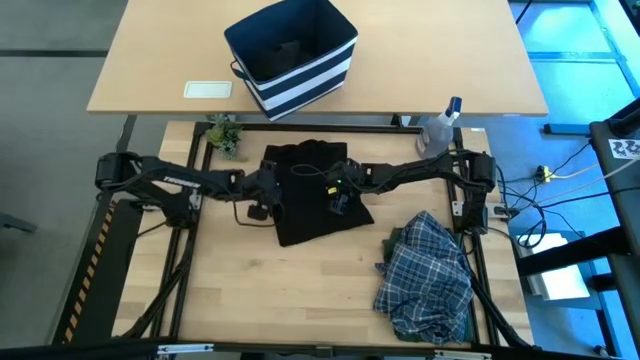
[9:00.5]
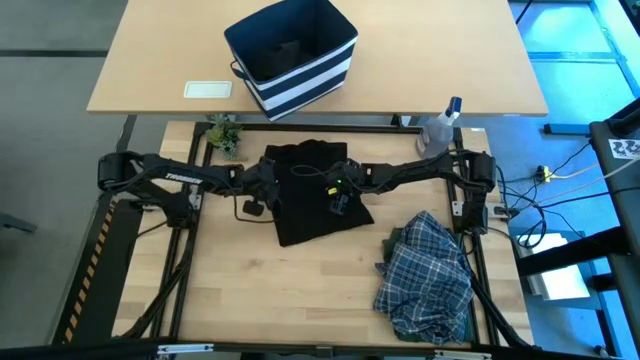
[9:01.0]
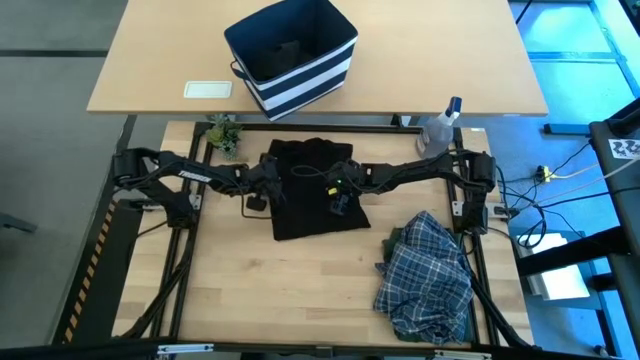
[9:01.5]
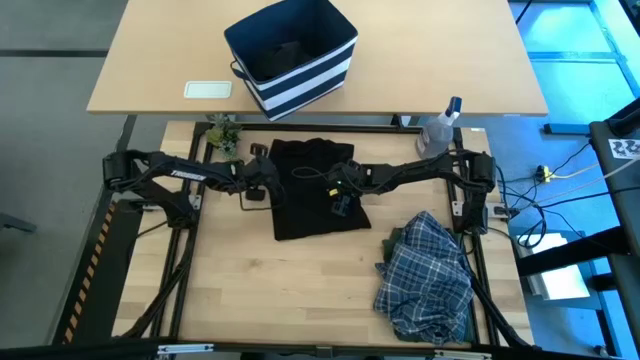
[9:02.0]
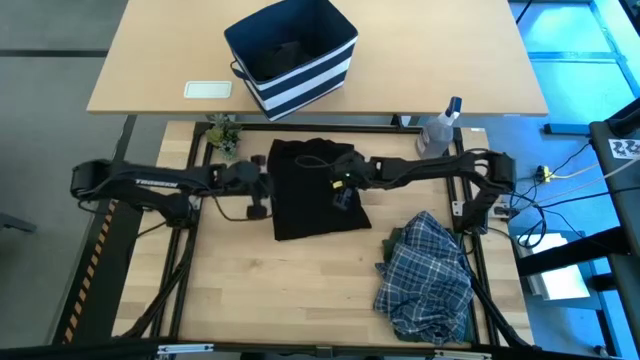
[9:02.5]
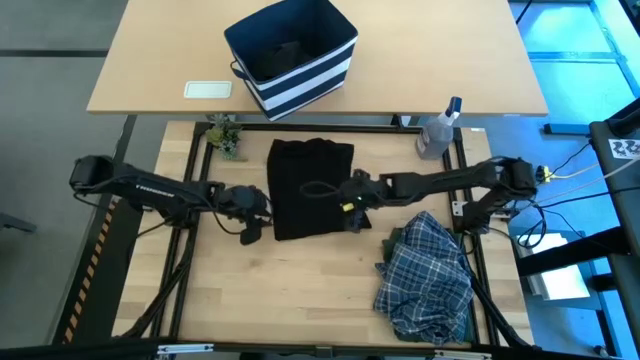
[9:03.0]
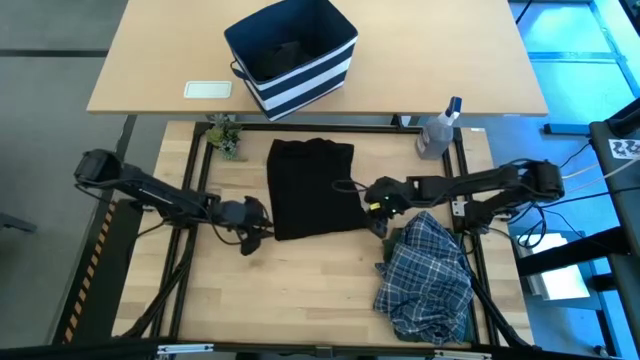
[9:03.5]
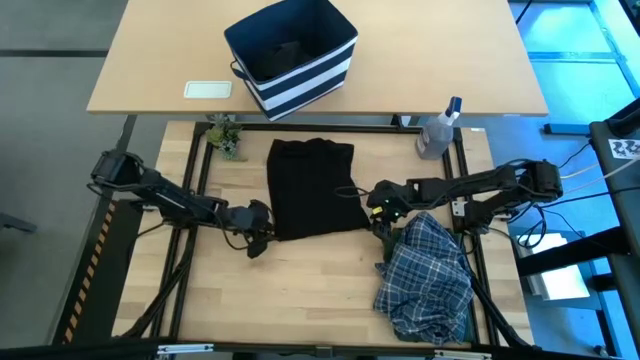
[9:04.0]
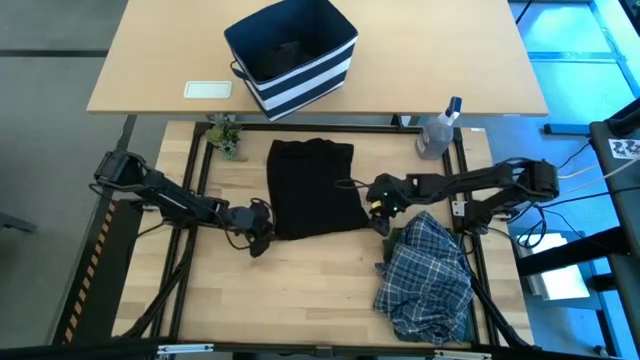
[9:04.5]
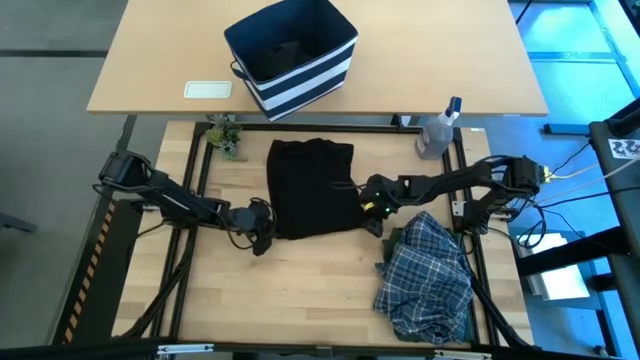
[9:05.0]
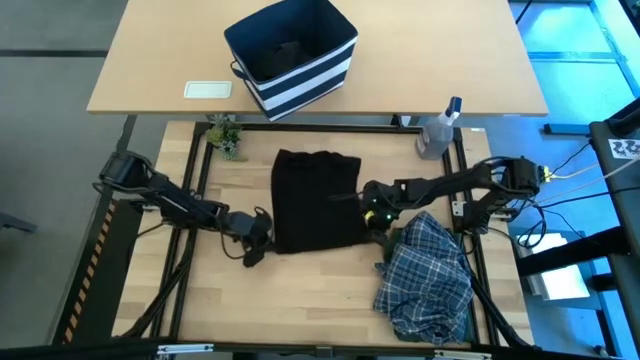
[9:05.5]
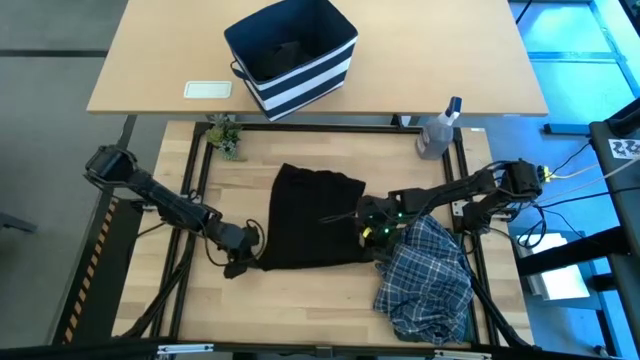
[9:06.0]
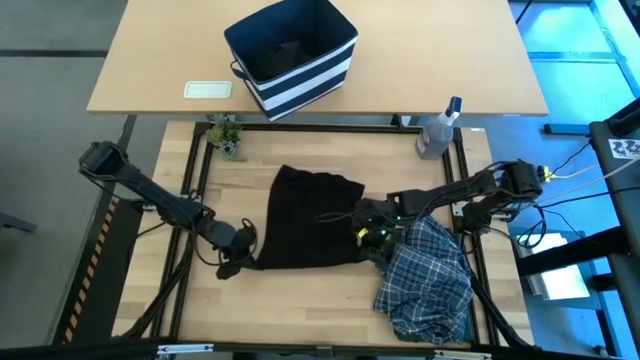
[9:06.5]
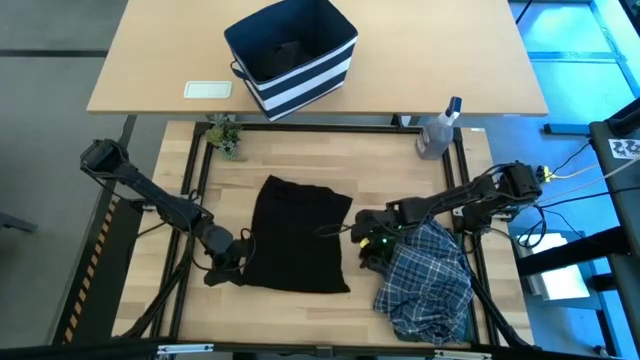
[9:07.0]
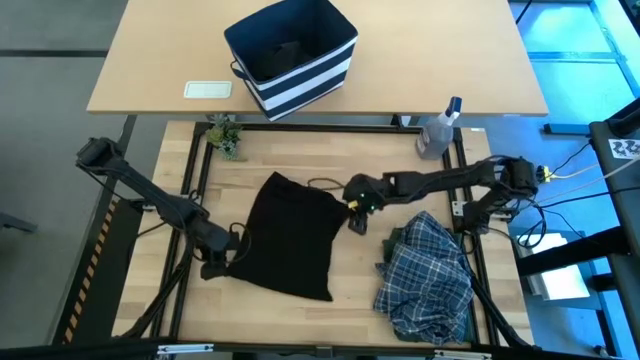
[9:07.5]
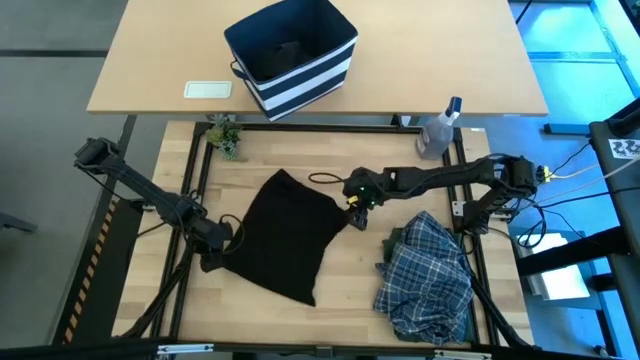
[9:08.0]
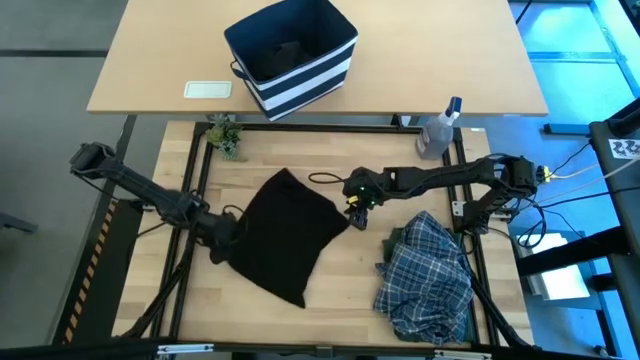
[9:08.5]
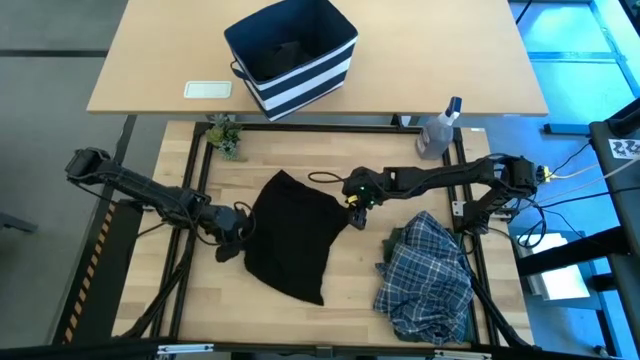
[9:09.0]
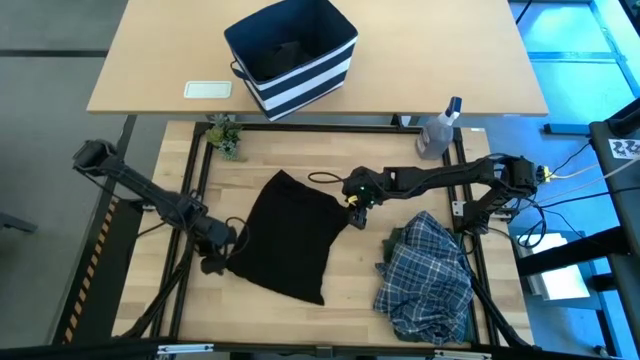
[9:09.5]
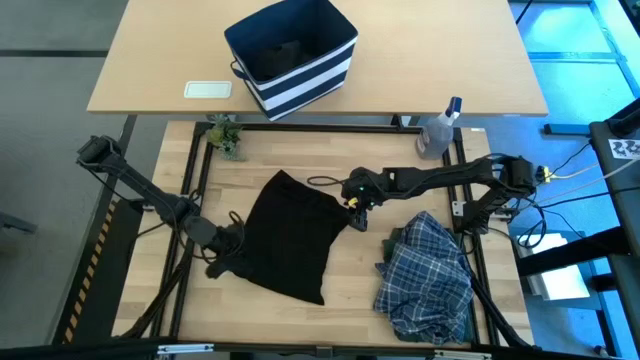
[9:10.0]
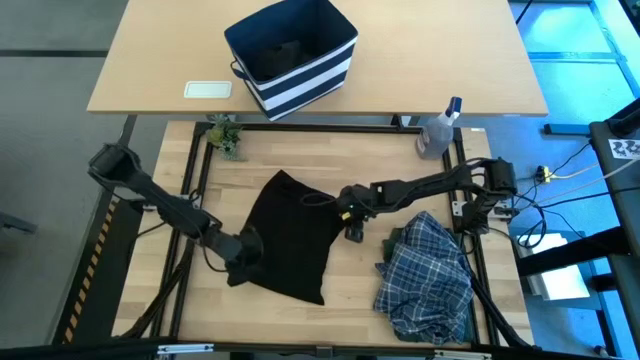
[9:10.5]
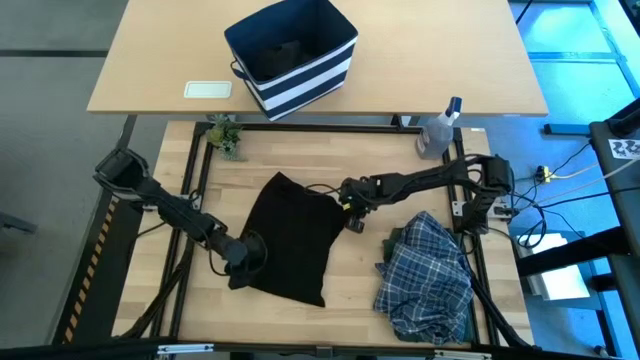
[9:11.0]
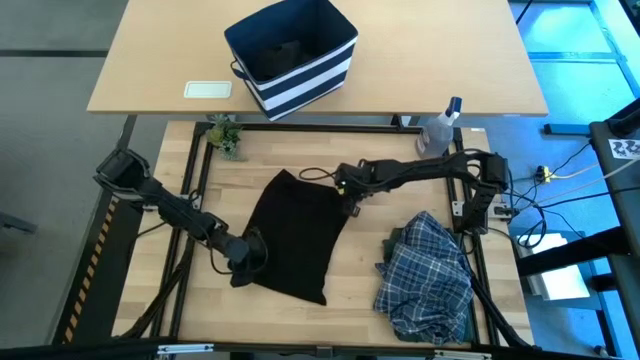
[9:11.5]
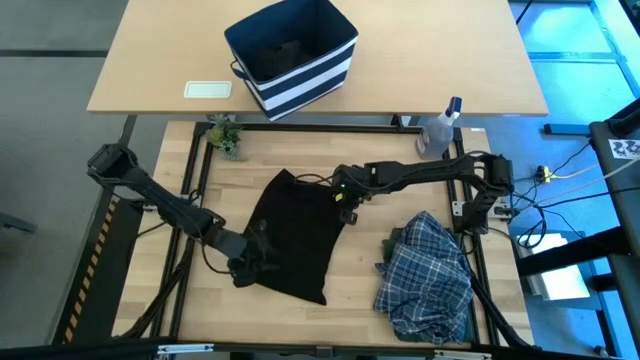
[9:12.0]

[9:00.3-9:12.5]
Task: Fold Laundry from Bin
Fold the black shirt

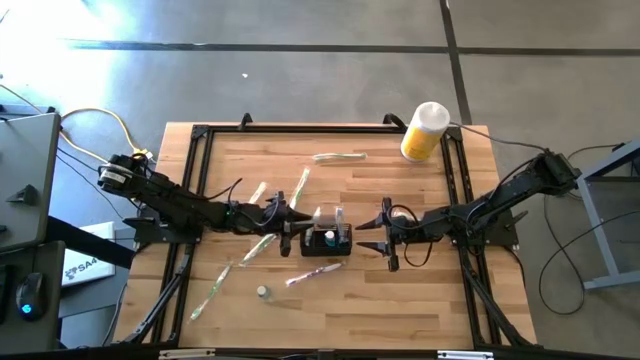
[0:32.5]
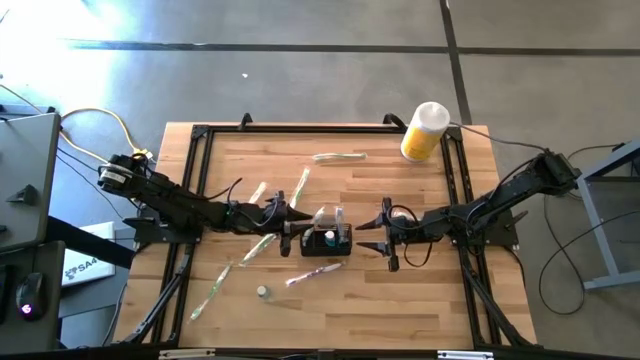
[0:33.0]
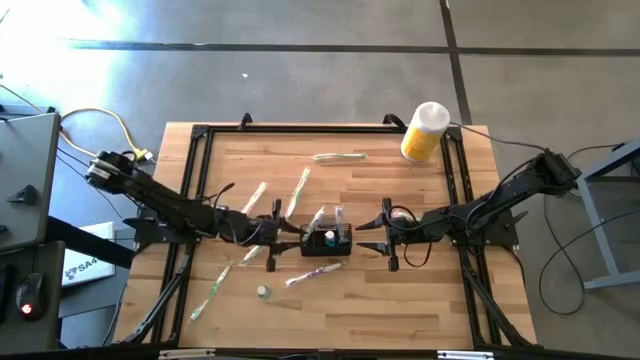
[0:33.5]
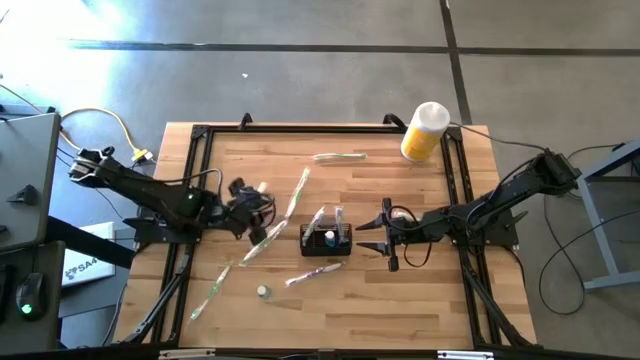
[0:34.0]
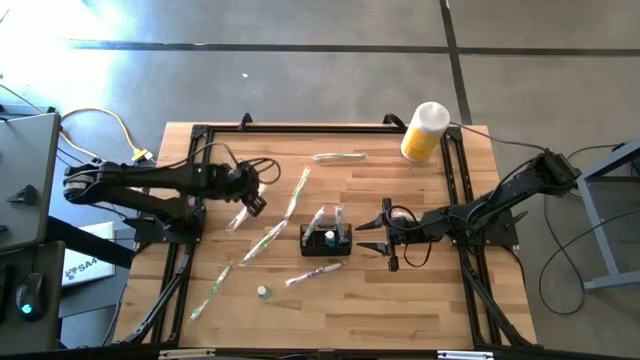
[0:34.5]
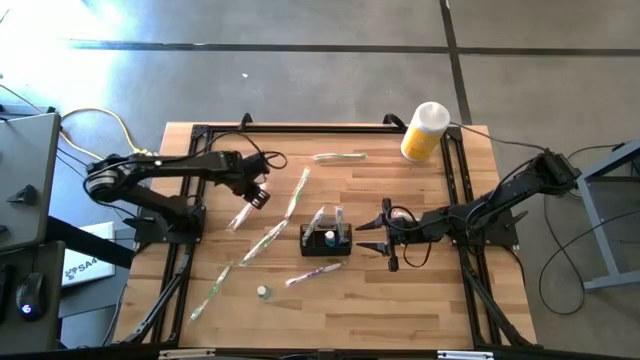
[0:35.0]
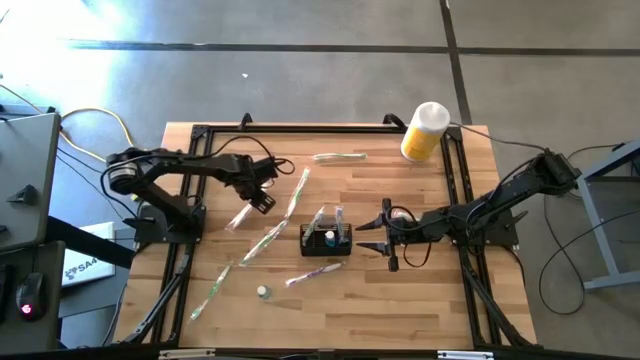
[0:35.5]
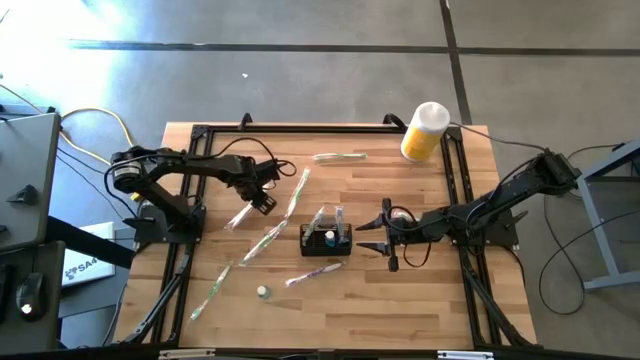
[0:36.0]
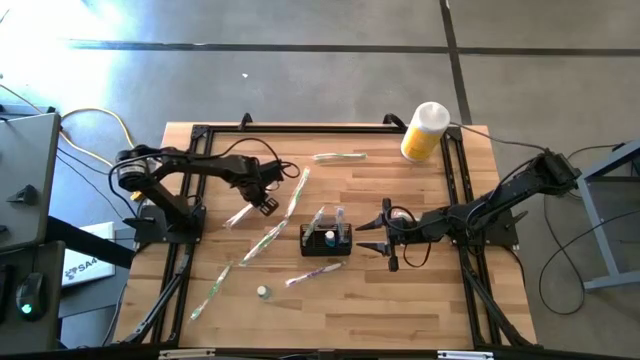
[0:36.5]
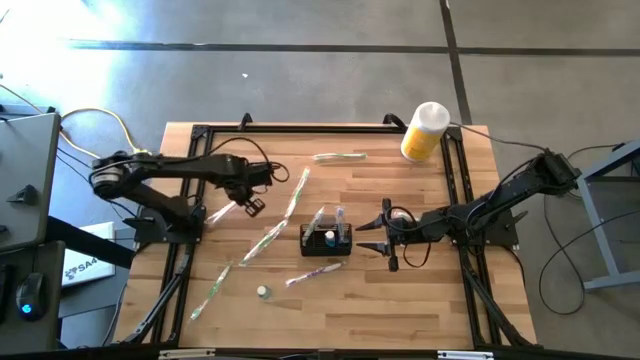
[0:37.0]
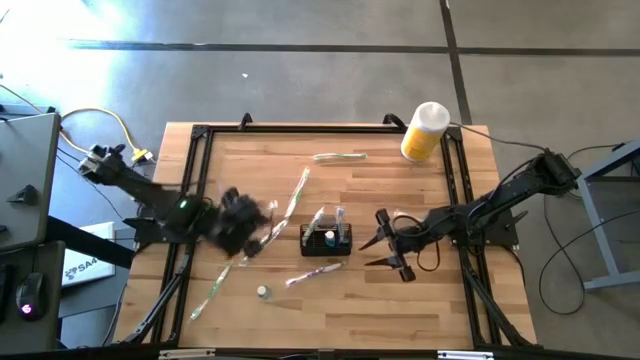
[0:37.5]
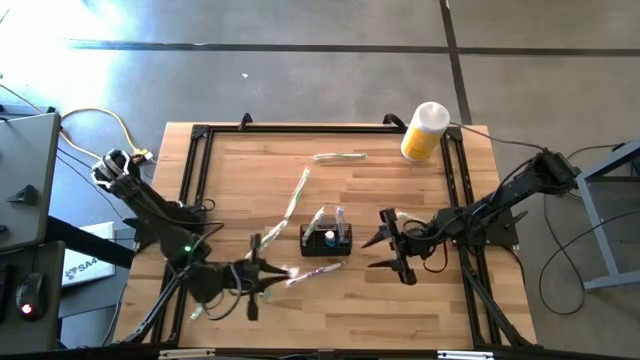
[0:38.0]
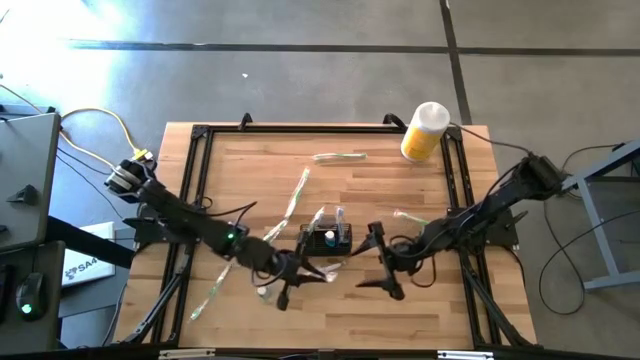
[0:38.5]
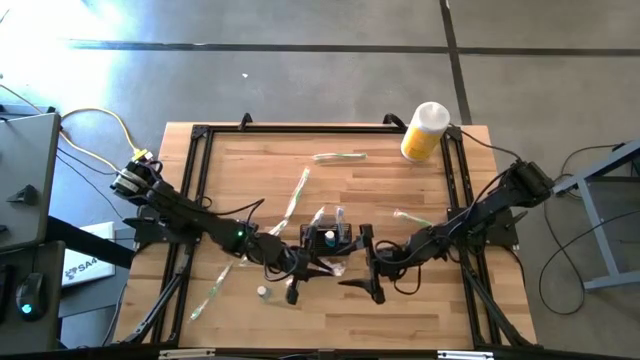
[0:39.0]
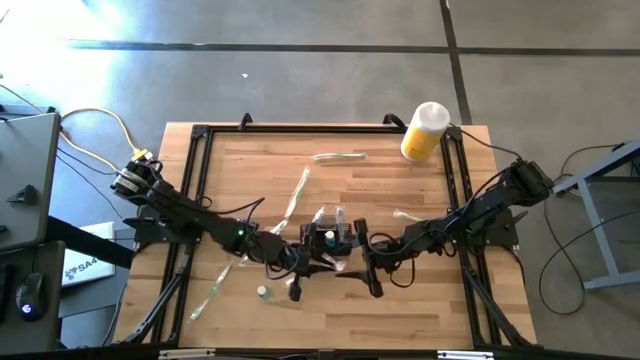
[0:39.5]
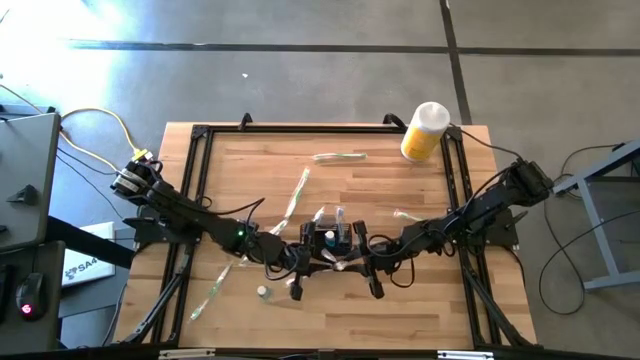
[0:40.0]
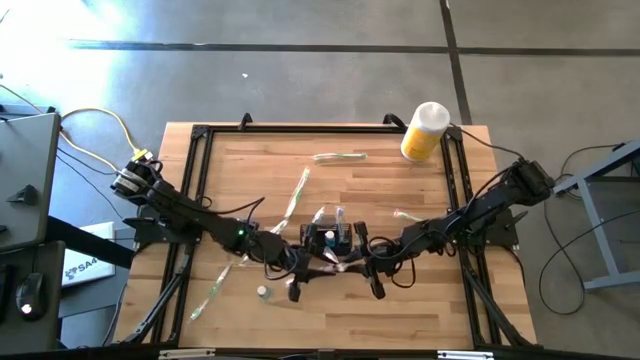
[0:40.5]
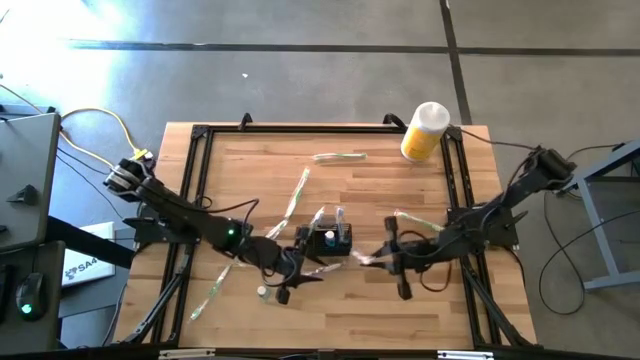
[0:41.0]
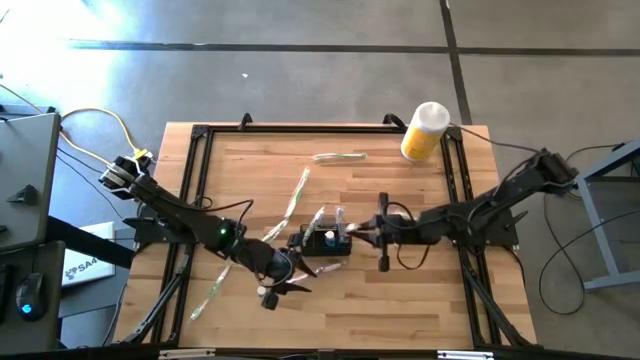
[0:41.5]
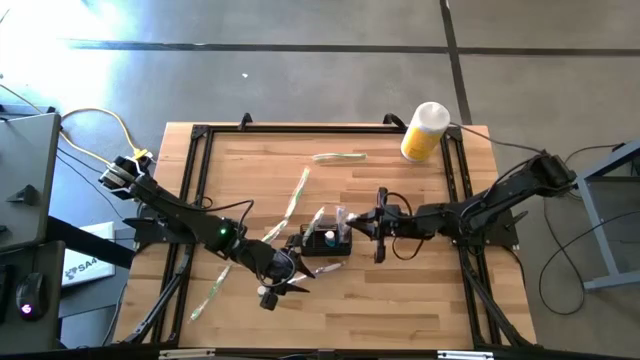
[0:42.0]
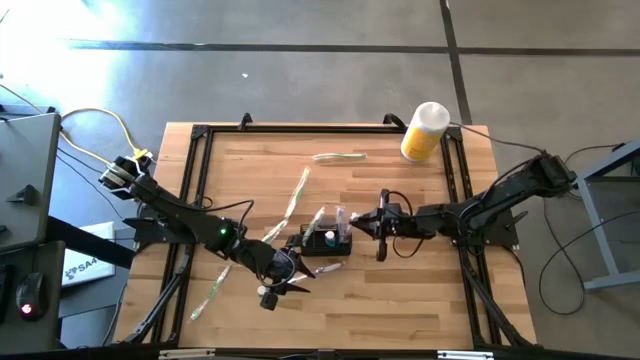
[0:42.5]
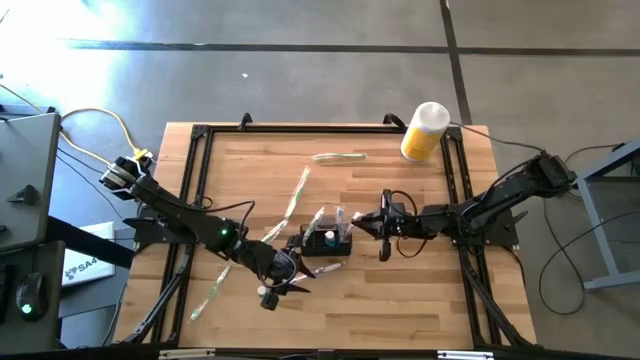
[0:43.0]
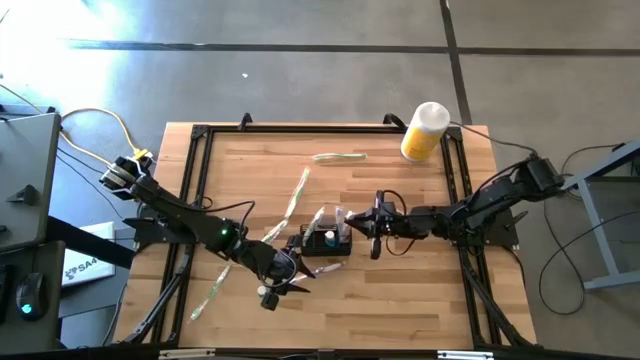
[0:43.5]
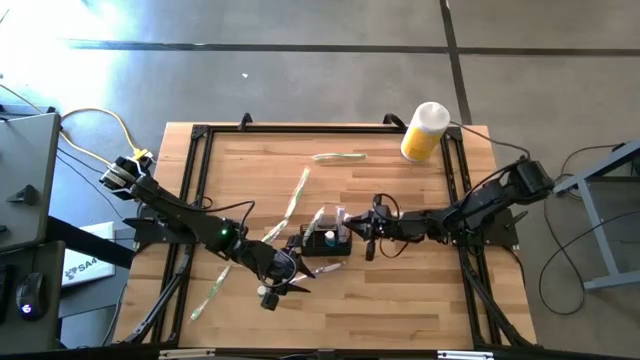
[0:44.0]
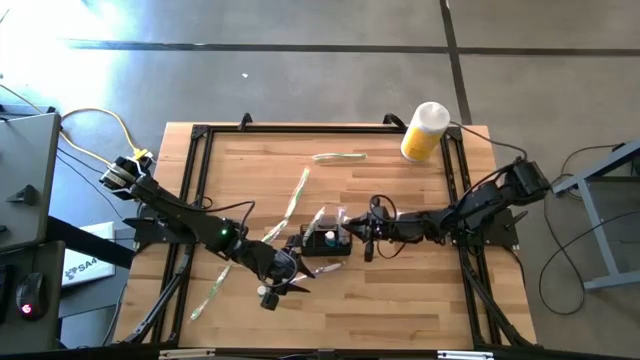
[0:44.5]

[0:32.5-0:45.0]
Task: Pick & Place toothbrushing station
Put the orange toothbrush into the black wire organizer
